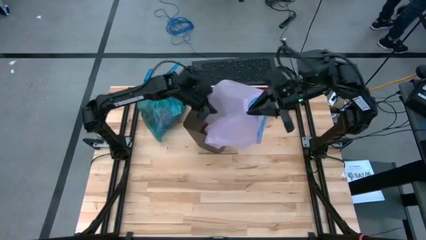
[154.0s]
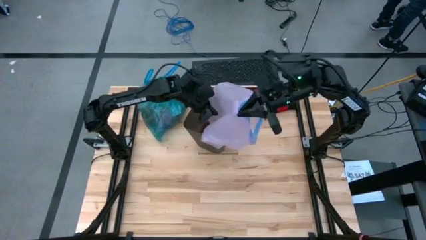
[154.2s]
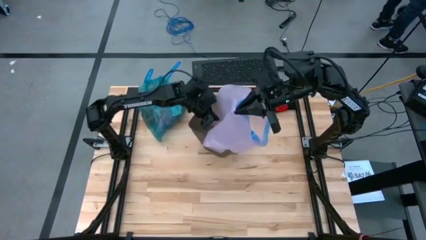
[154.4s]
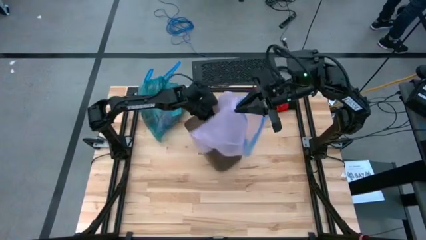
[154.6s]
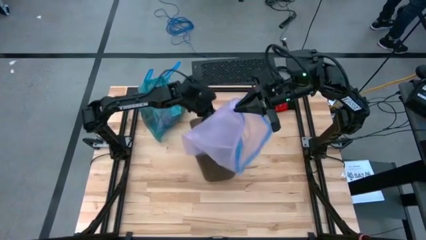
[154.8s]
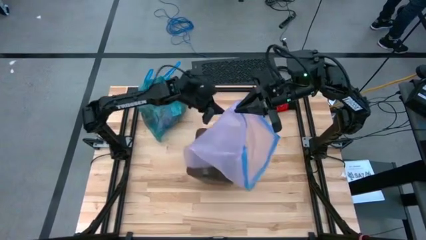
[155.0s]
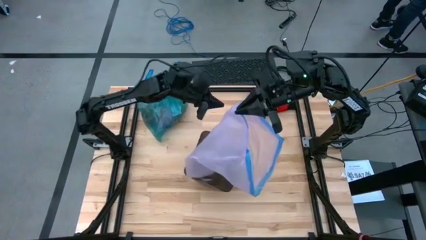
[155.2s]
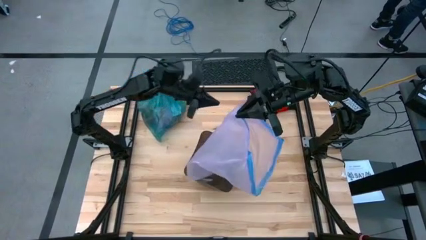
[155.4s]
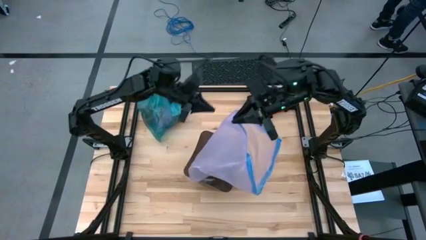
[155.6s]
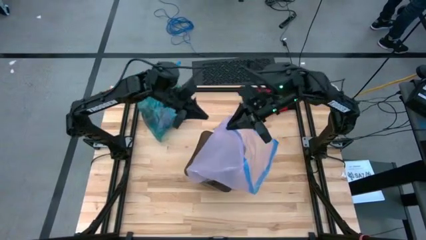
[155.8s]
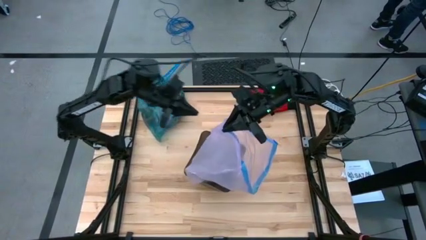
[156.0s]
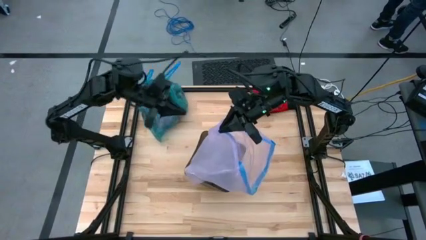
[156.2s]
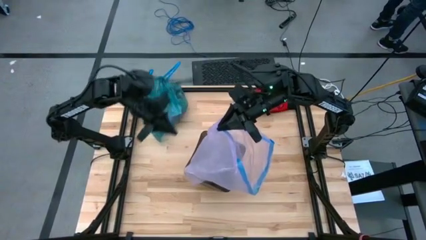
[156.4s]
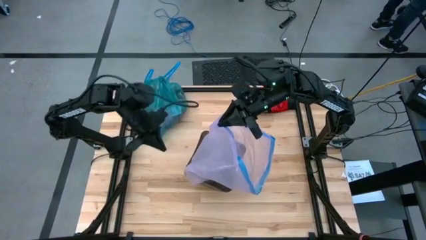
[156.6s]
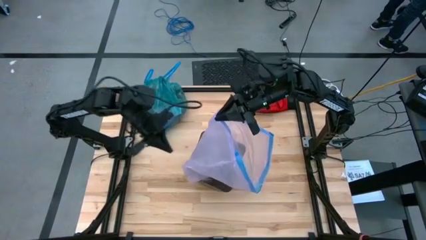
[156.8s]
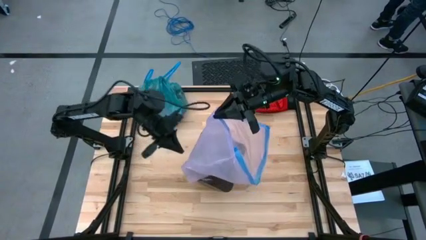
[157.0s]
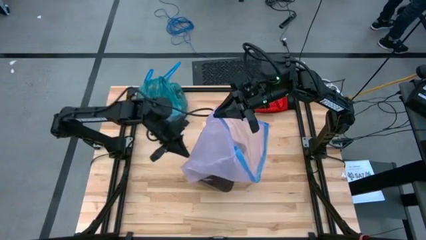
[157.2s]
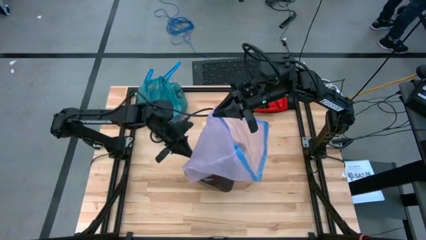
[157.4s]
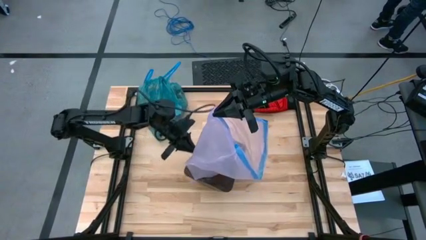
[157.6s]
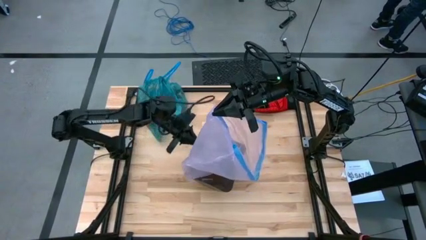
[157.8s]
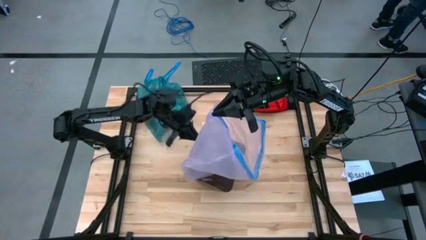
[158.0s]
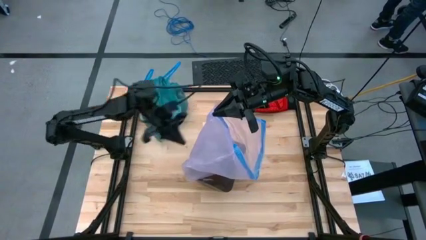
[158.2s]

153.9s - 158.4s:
Task: place trash/remove bag and relplace
Insert the new pink trash bag into the trash bin

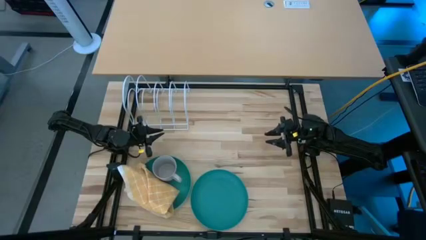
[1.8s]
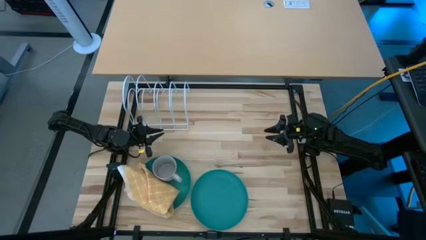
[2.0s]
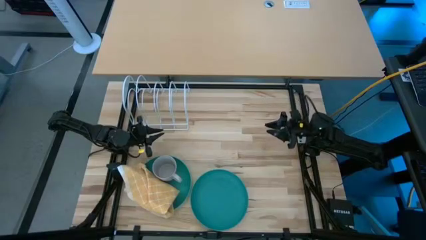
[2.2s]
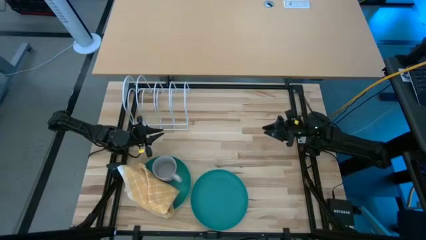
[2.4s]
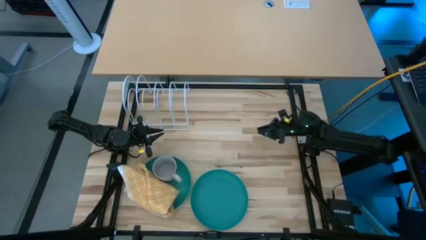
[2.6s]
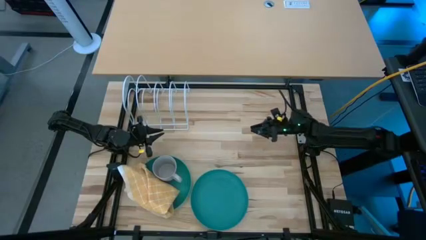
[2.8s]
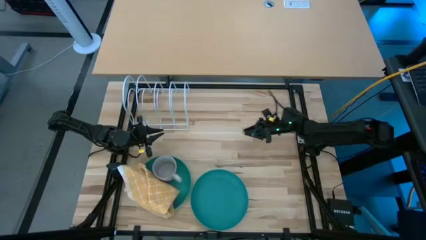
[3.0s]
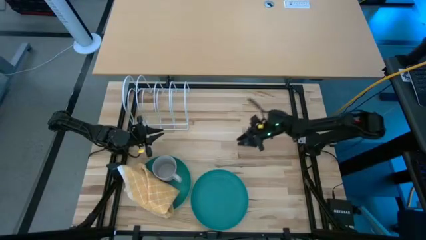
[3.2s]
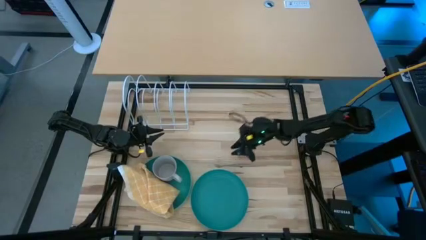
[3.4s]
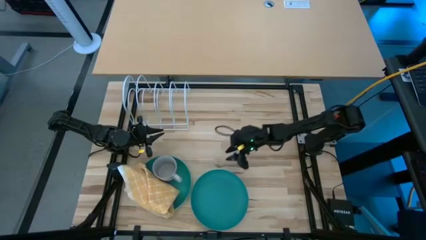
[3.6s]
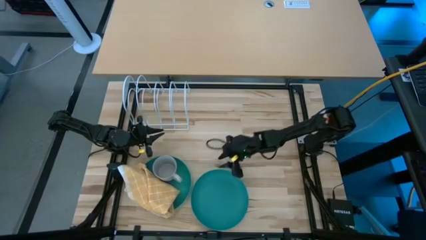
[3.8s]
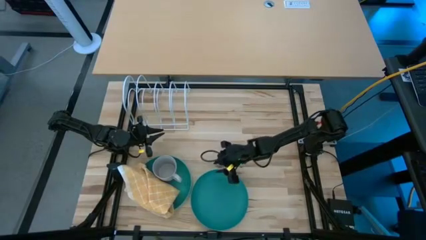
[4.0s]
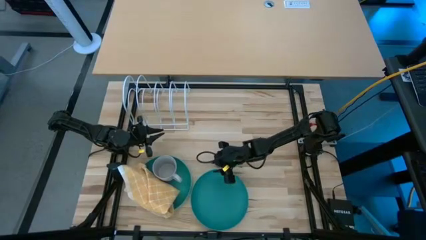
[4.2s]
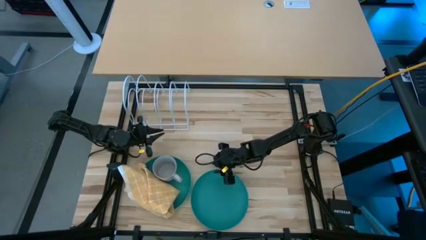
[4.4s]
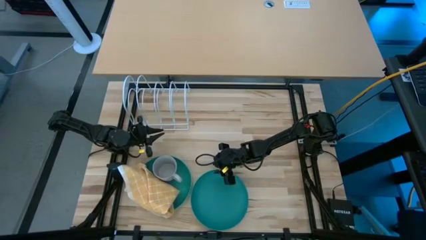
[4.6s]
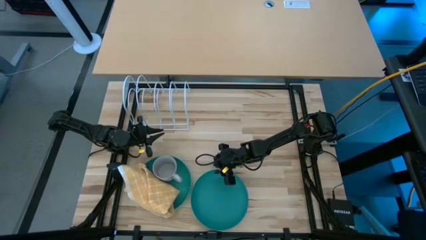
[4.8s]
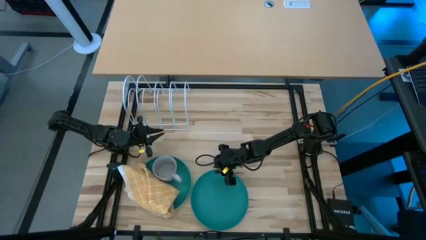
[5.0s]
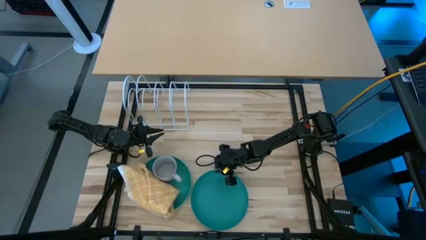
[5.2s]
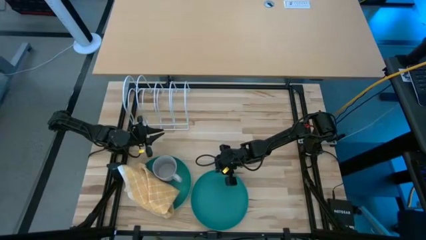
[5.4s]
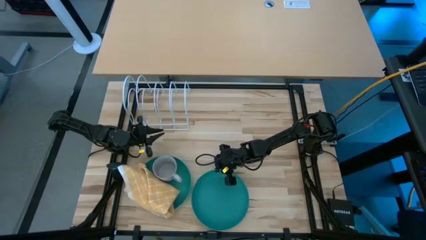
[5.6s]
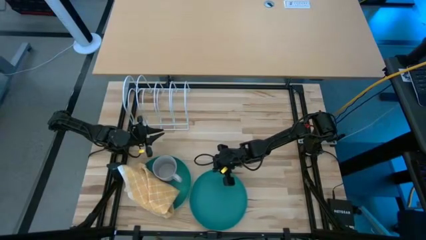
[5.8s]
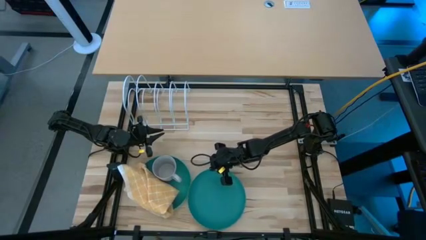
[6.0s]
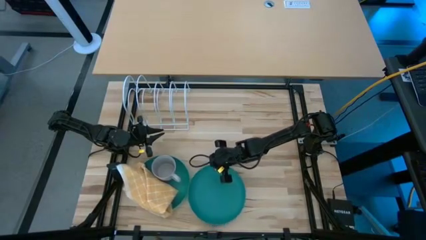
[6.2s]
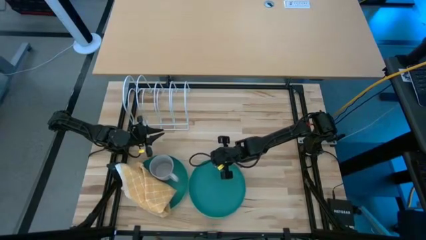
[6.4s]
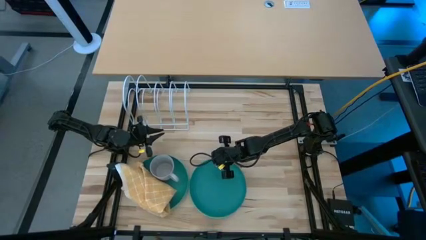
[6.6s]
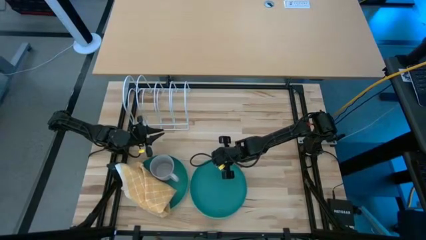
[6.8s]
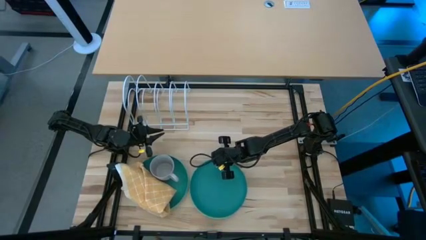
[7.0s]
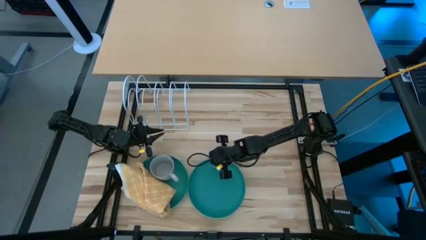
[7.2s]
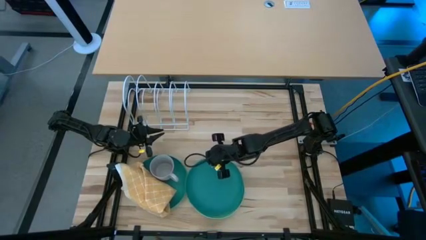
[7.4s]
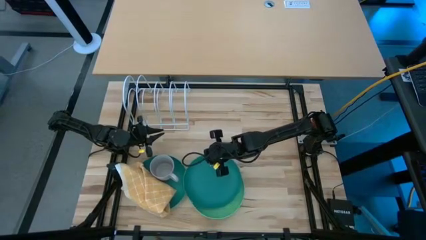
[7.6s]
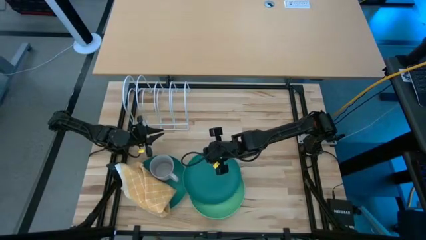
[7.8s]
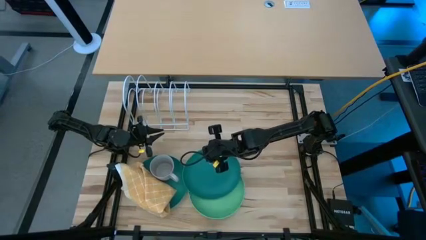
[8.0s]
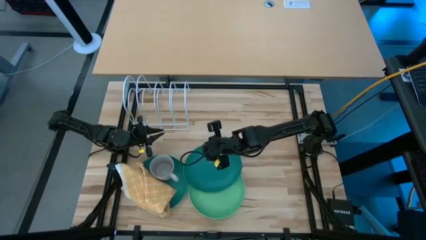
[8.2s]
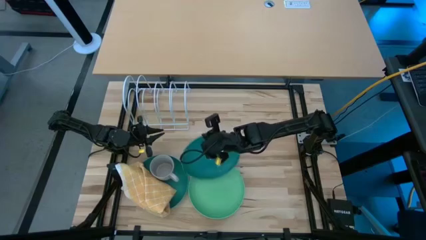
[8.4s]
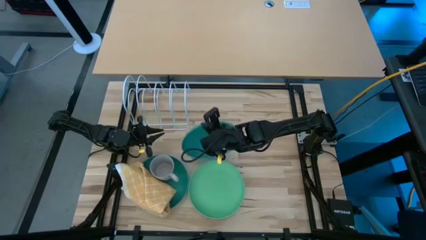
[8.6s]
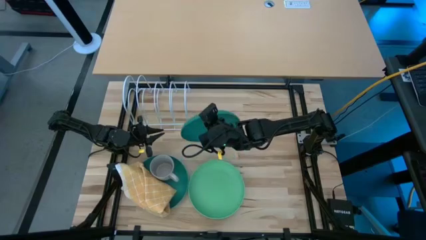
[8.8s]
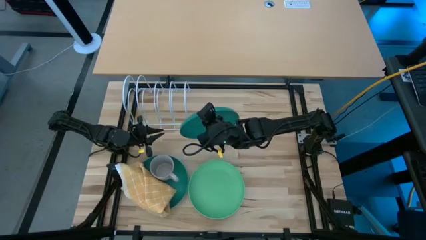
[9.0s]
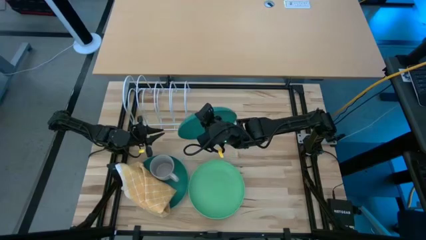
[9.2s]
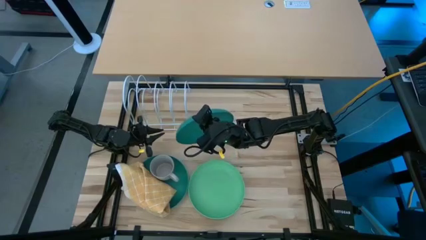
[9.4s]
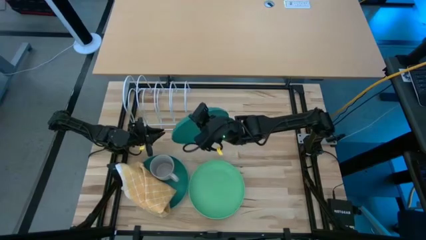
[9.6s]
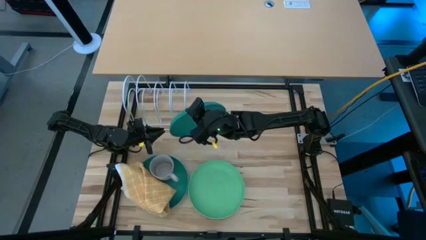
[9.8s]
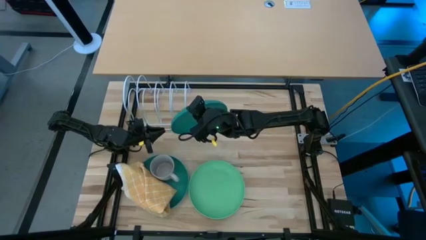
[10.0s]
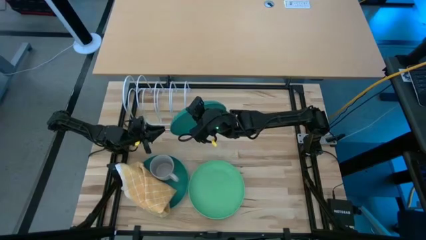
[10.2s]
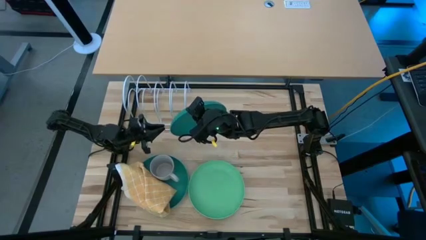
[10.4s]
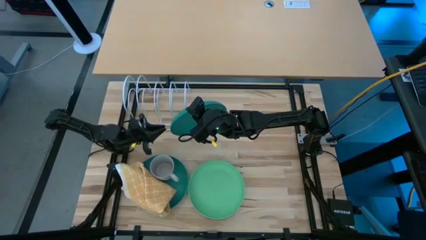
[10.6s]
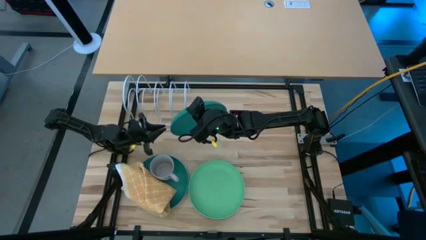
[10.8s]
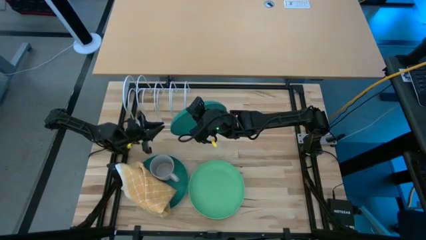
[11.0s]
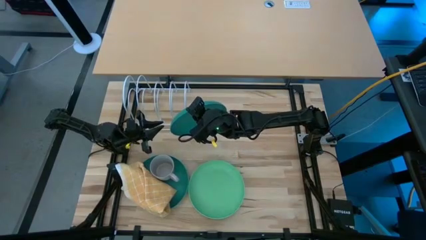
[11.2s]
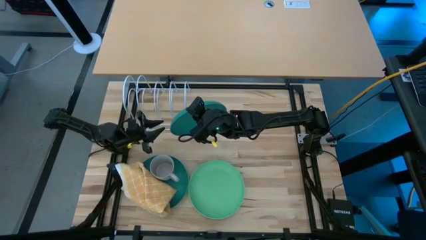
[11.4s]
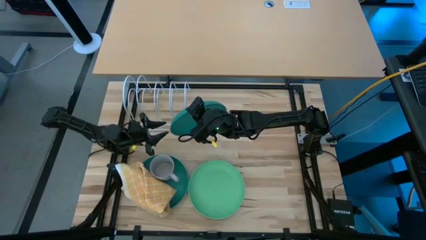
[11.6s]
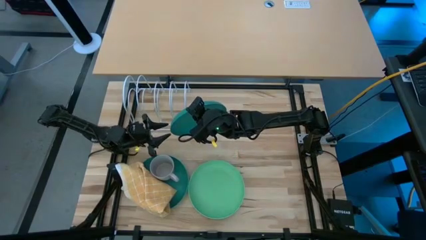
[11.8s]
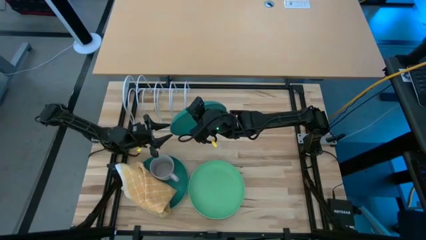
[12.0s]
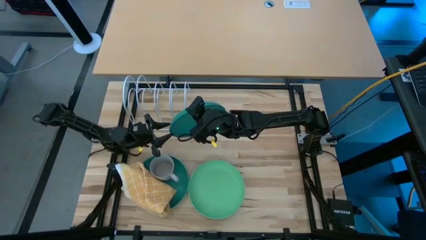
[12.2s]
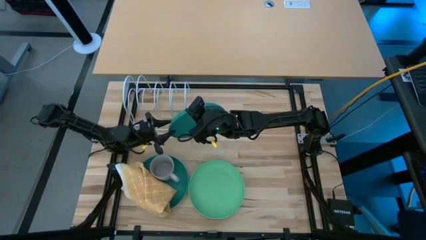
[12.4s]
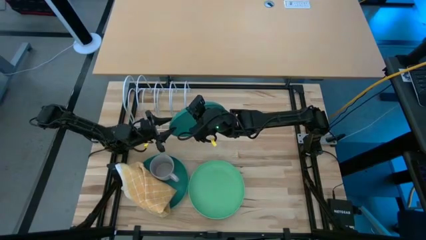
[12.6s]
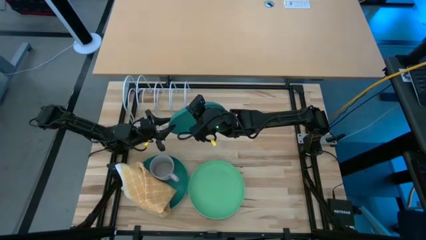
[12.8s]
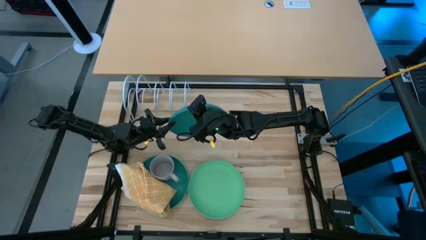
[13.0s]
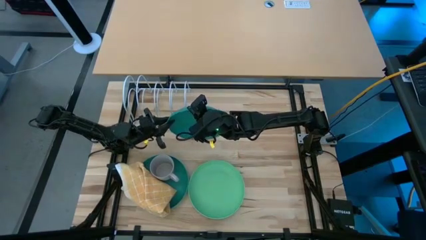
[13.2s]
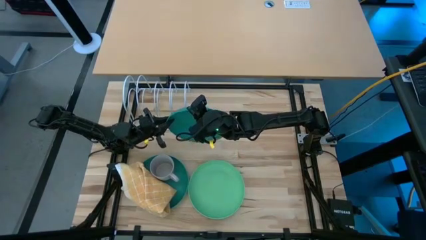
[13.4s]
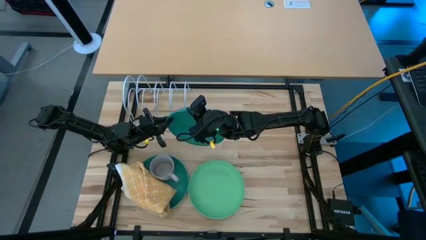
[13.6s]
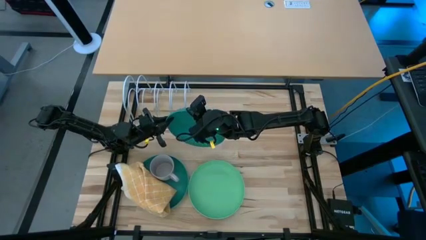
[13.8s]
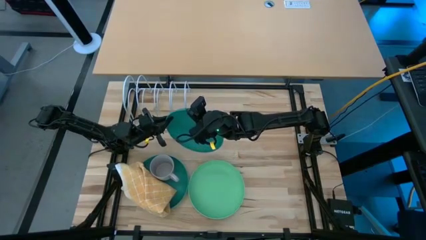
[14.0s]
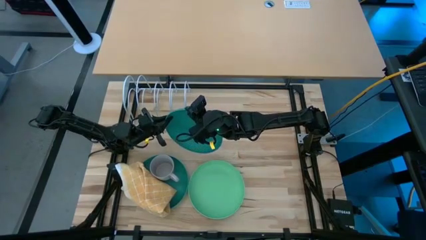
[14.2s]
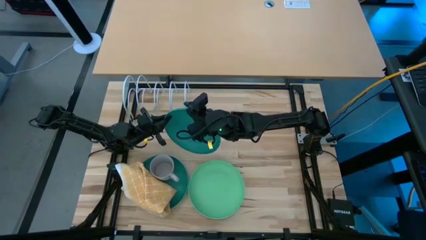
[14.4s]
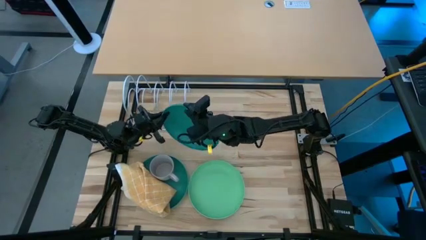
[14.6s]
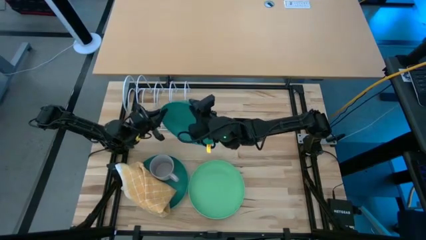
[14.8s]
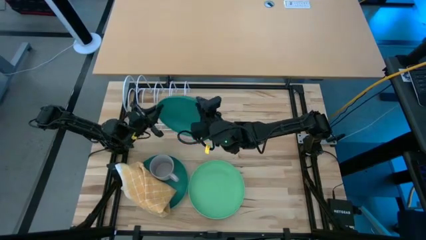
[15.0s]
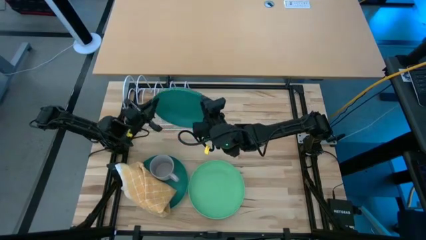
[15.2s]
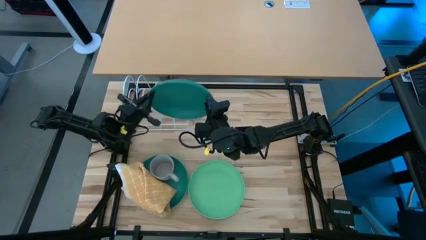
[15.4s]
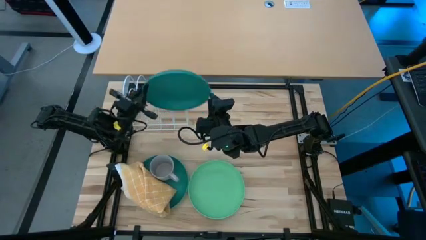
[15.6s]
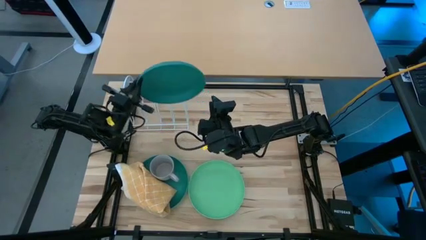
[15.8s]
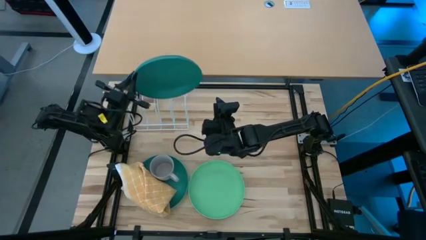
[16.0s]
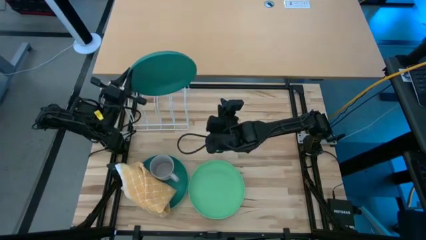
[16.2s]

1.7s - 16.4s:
Task: Sort dishes
Put the right dark green plate into the dish rack
